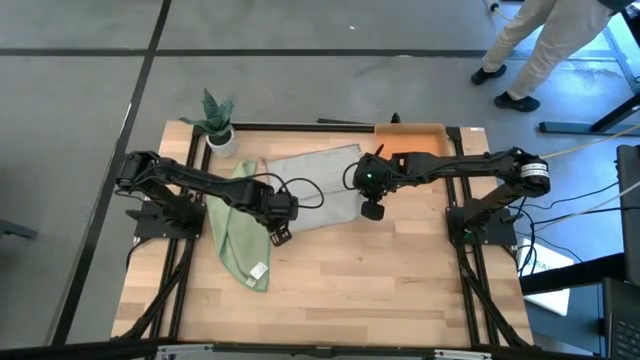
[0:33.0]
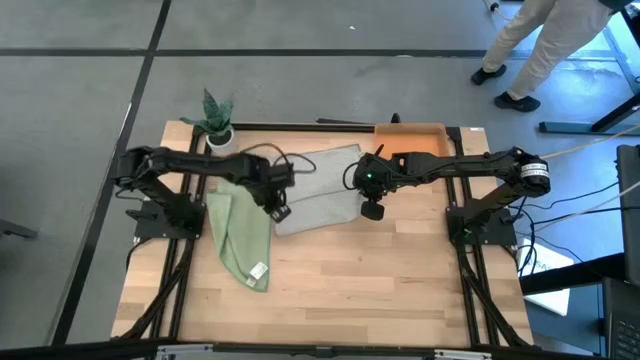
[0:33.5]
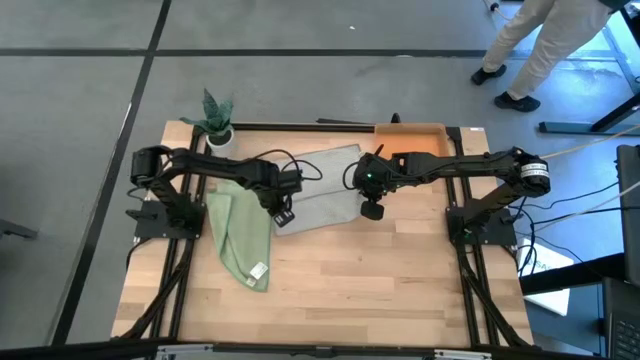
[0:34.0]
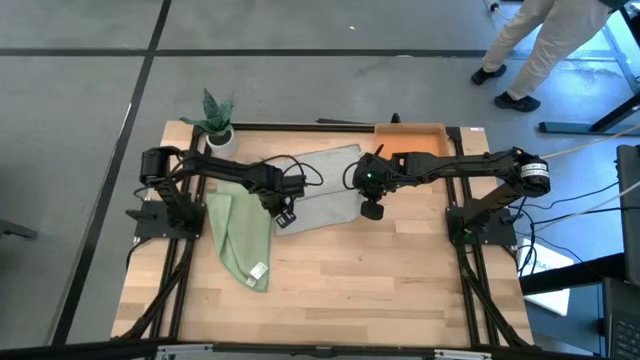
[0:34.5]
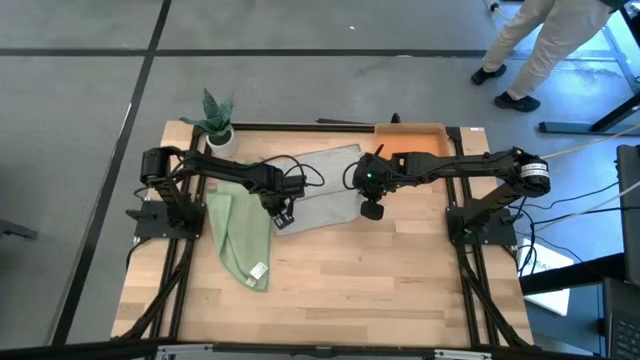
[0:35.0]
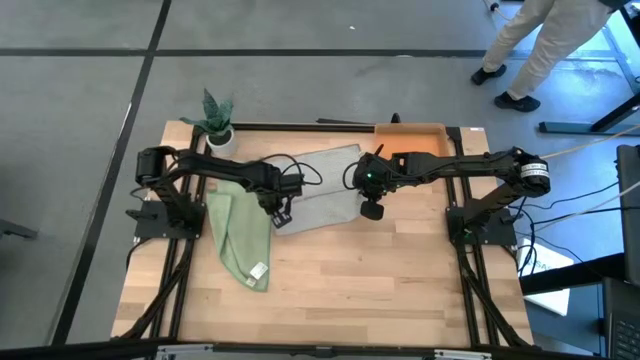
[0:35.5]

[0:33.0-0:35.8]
Task: Roll microfiber towels into tight, uniform cylinder then place into a basket
Fold the gray microfiber towel

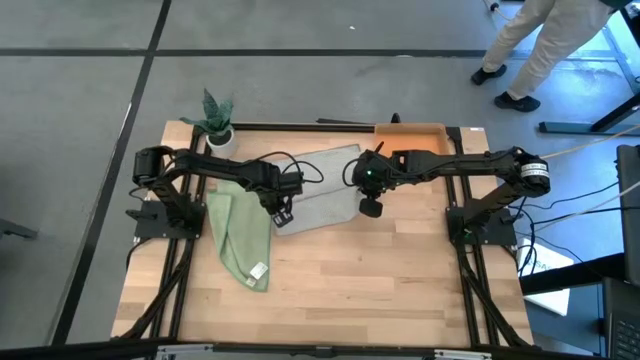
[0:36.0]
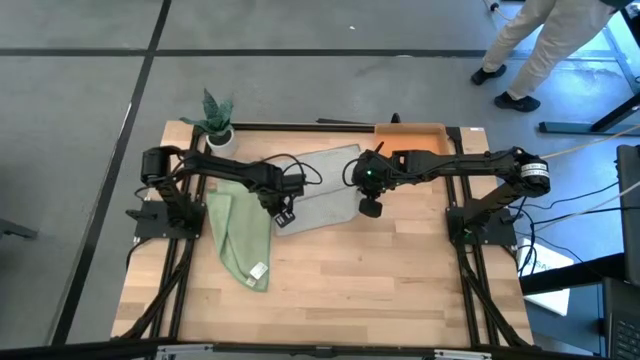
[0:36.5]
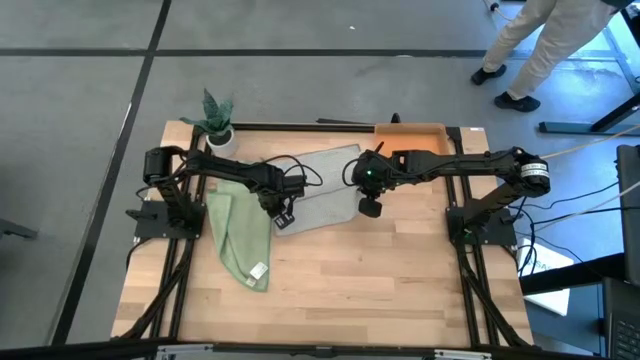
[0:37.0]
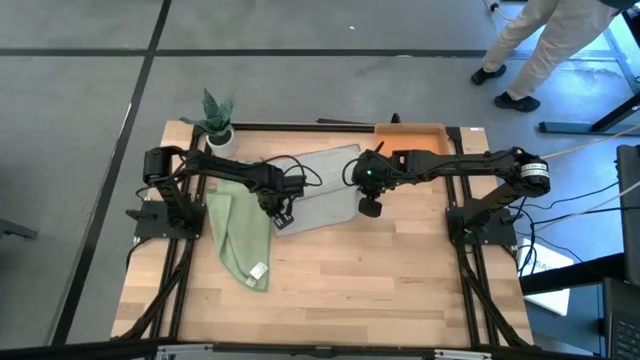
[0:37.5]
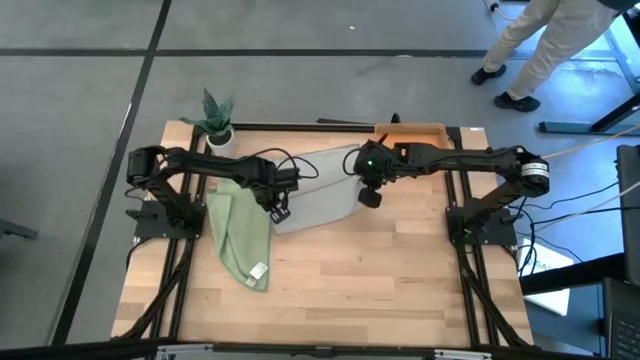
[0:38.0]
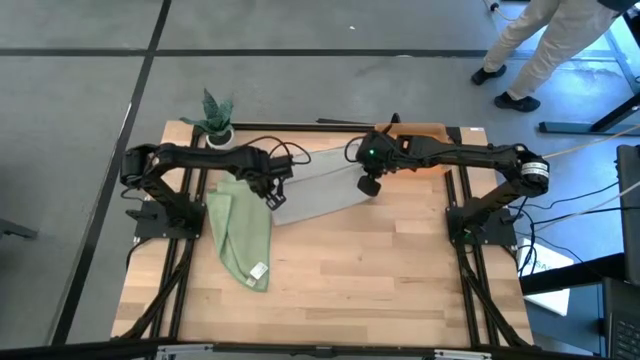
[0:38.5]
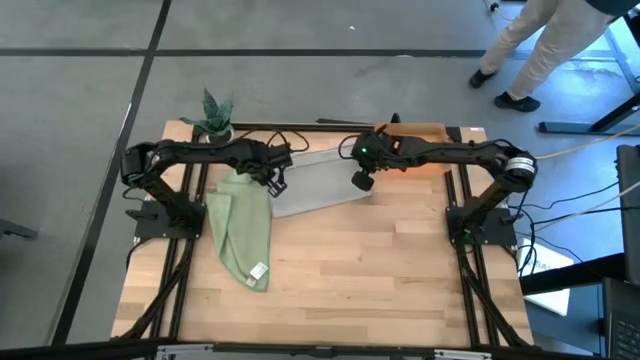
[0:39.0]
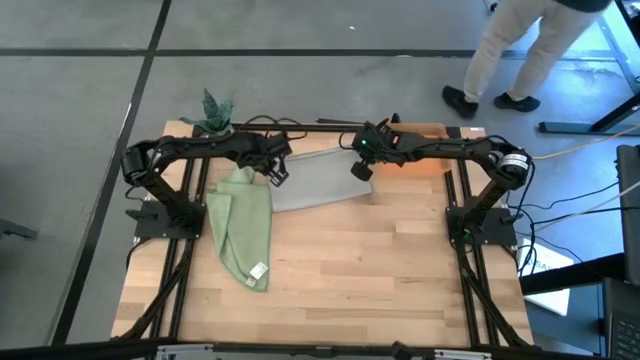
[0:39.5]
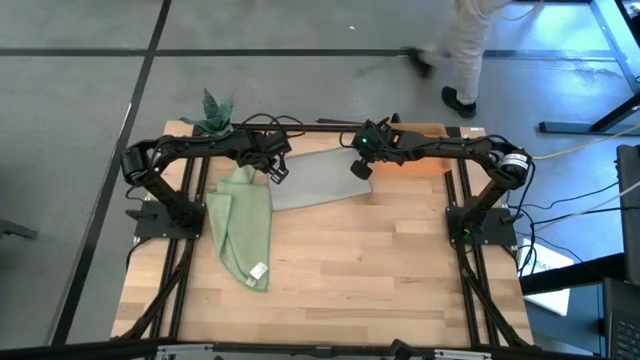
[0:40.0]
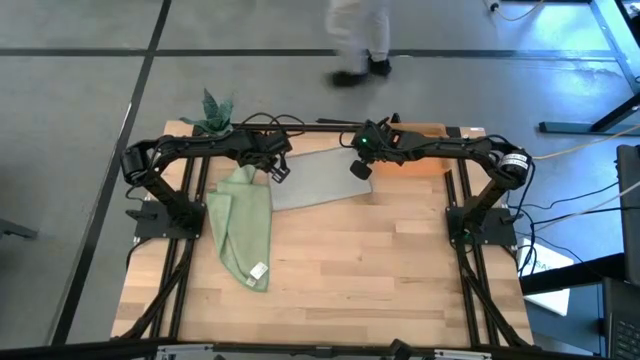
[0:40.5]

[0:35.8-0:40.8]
Fold the gray microfiber towel

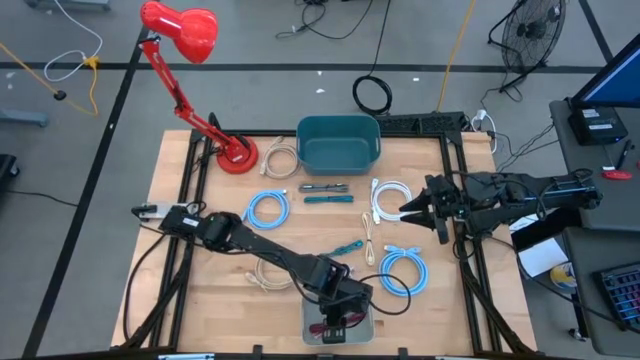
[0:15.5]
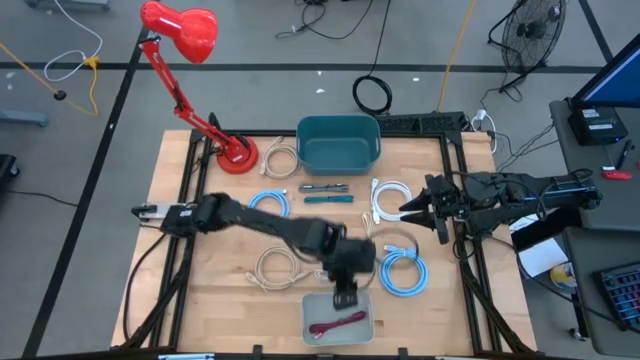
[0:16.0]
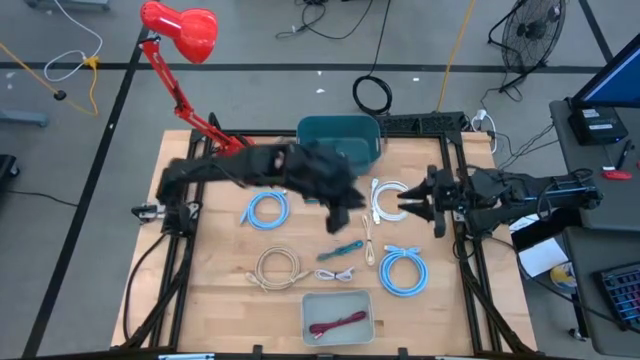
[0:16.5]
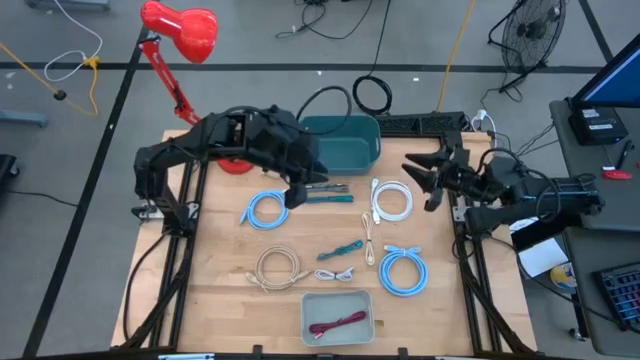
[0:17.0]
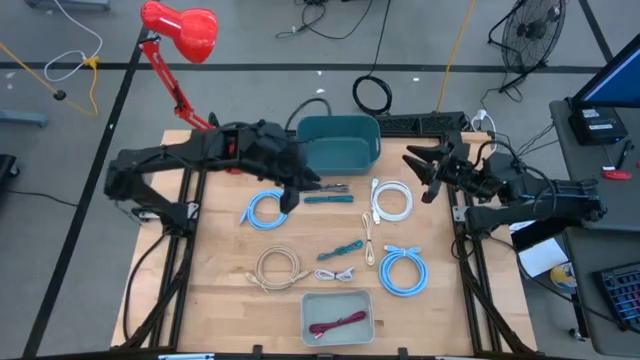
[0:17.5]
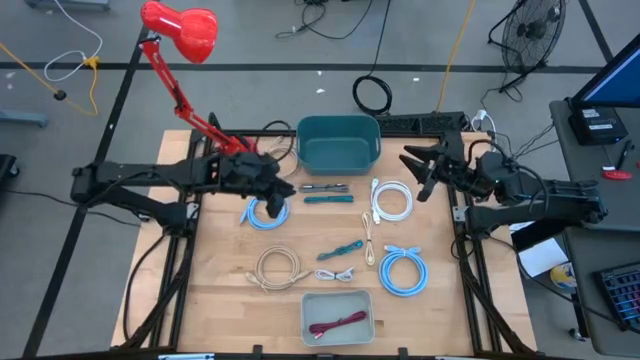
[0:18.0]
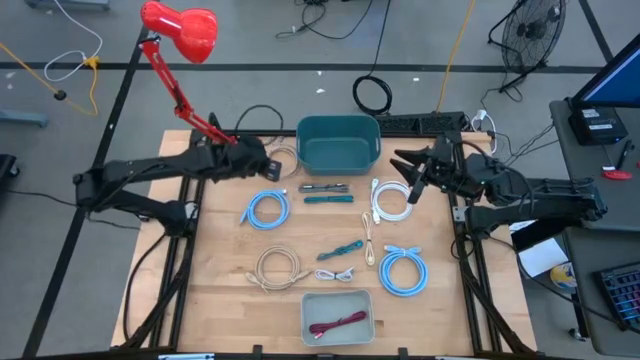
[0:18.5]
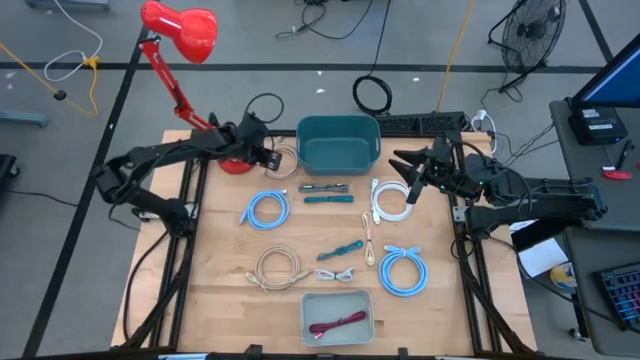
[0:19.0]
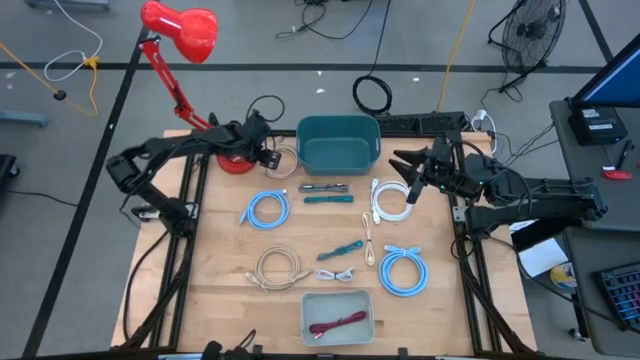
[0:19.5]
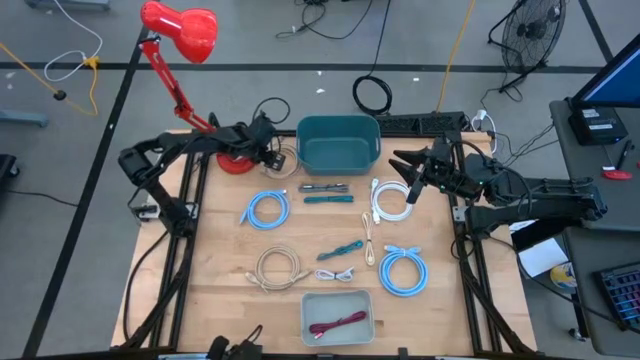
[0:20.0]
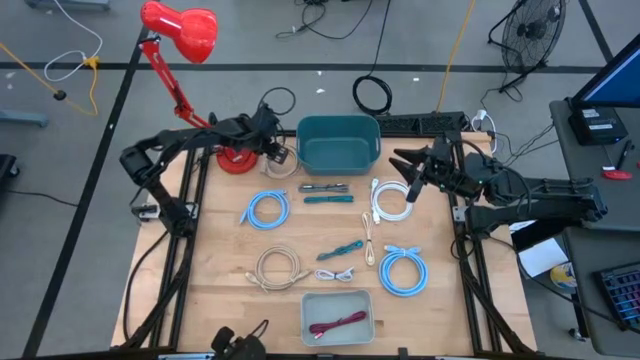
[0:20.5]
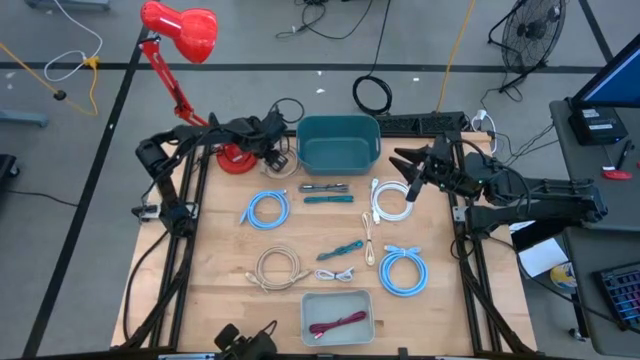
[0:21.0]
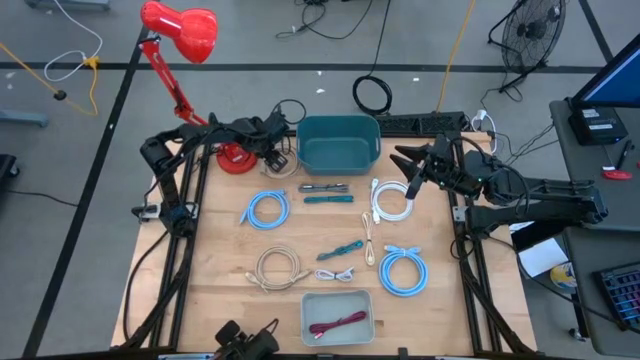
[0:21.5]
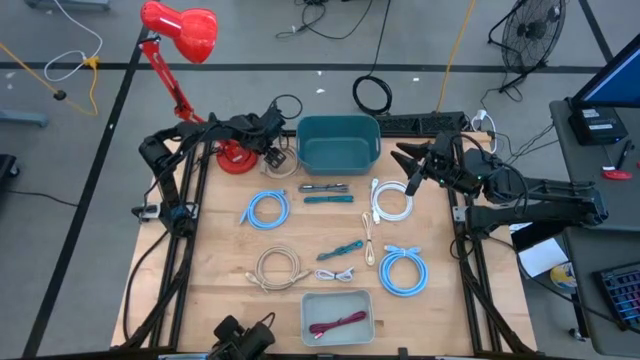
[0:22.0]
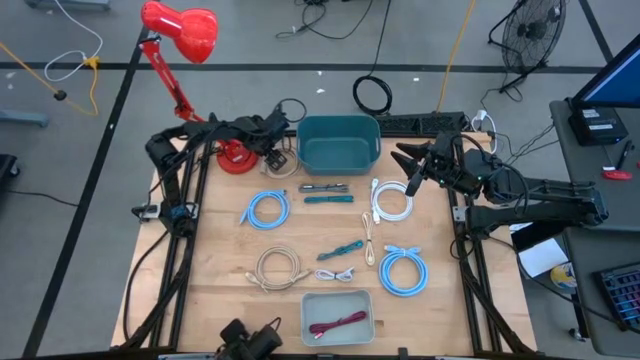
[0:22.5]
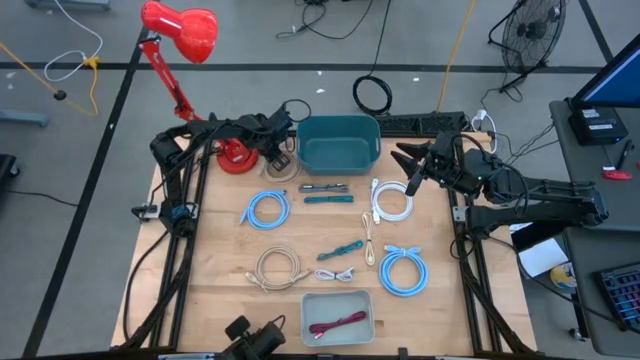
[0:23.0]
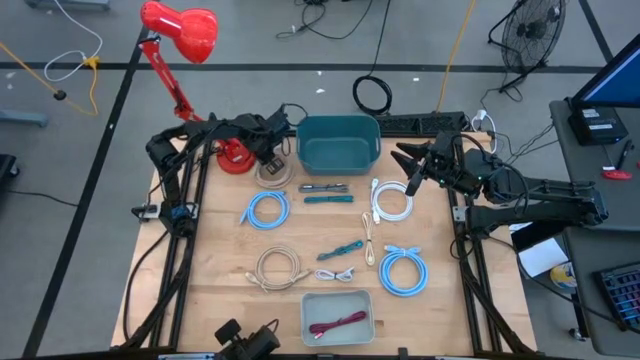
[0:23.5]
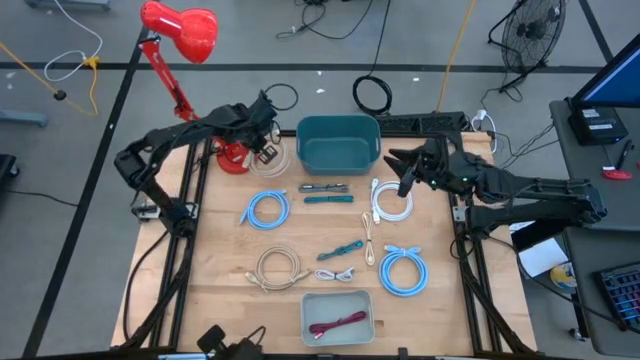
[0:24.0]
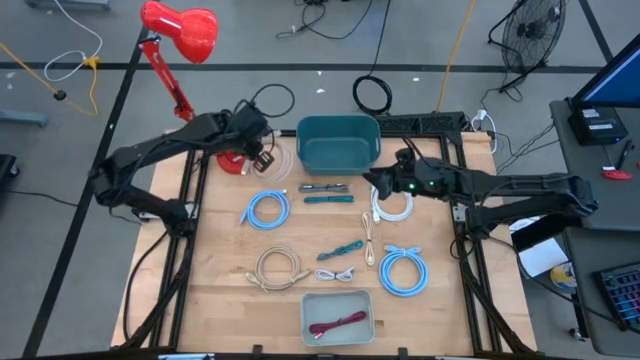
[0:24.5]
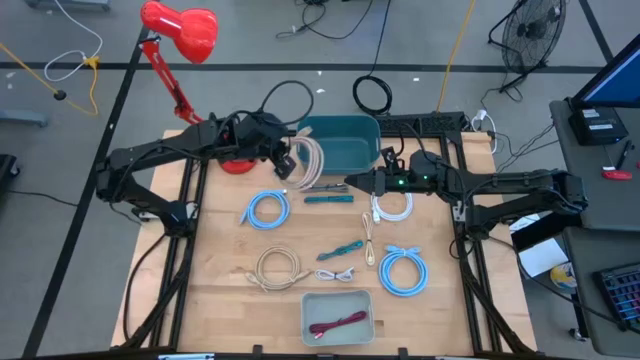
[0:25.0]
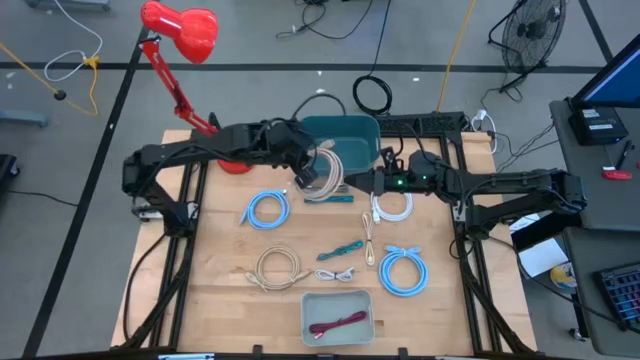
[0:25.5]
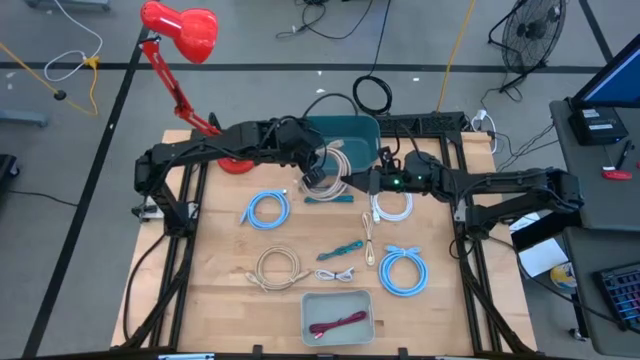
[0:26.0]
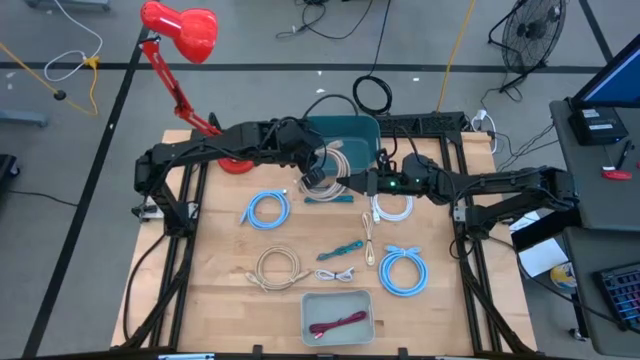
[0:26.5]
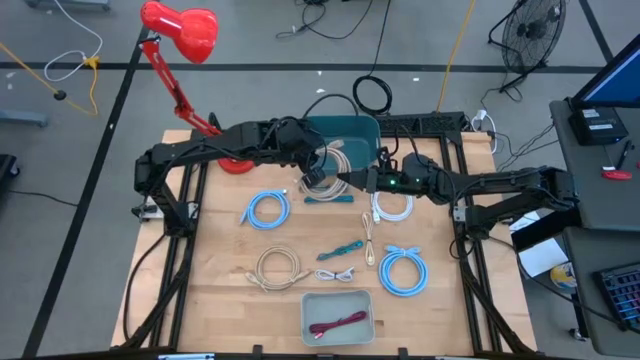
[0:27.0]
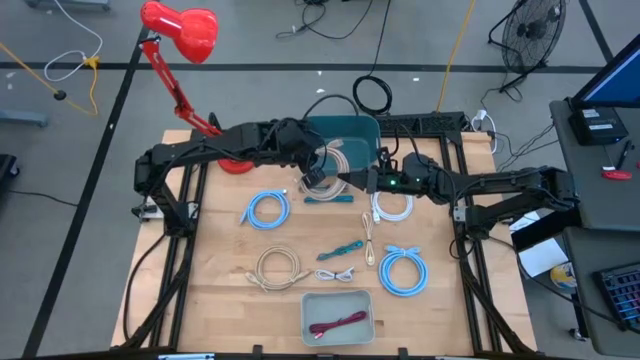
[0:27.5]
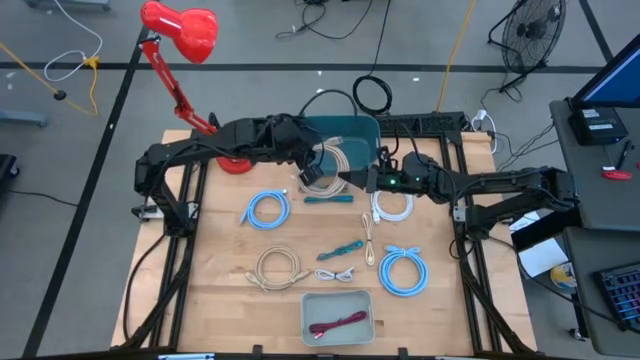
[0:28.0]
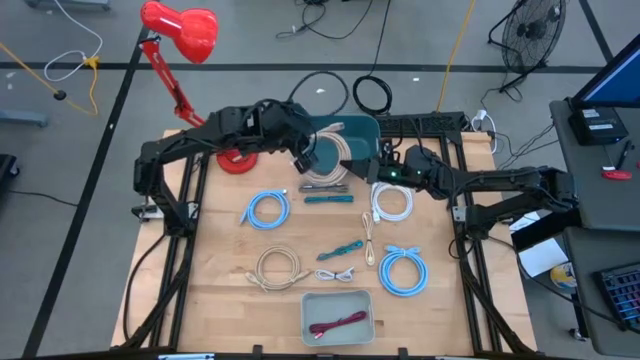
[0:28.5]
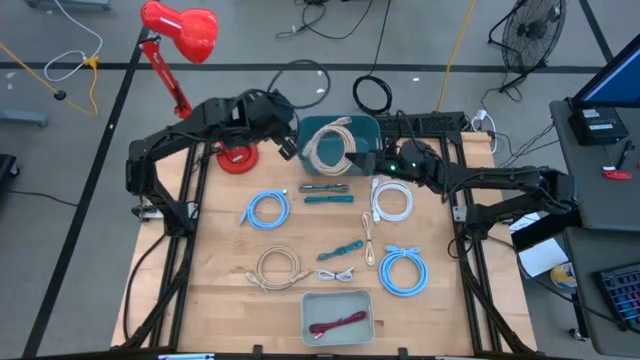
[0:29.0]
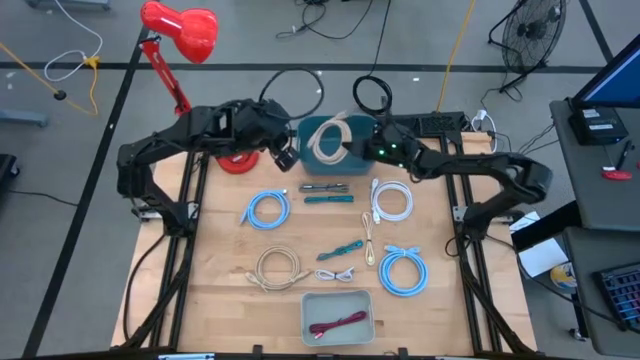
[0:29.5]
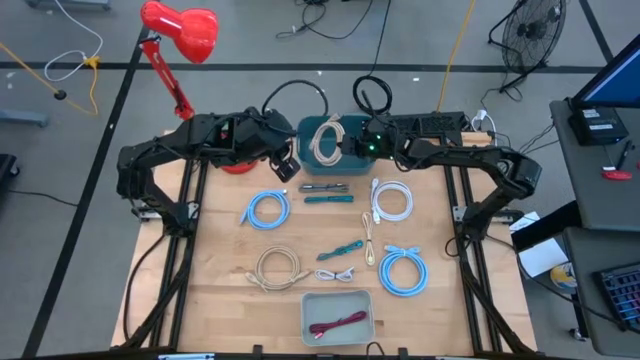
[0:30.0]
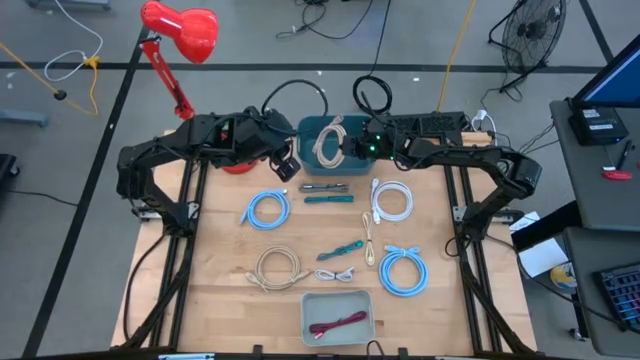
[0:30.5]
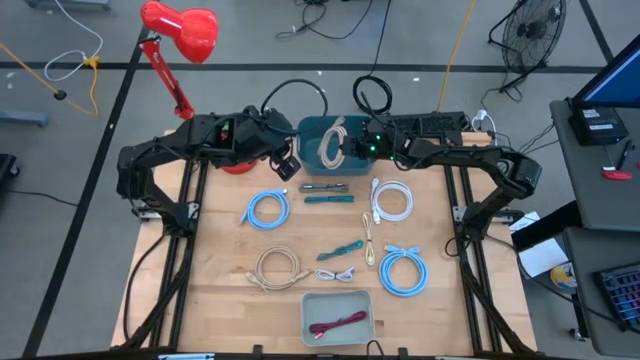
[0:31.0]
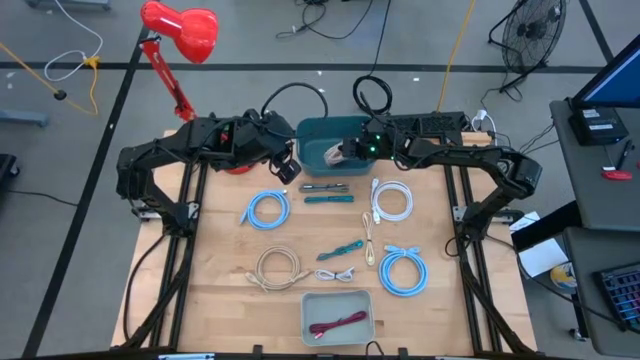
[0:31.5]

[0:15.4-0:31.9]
Task: Pick & Place USB Port
Put the top brown hdmi cable into the green bin
